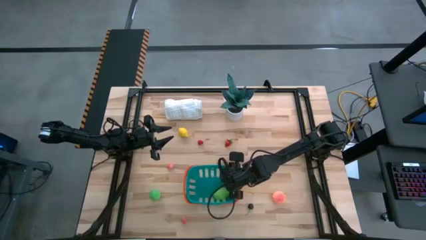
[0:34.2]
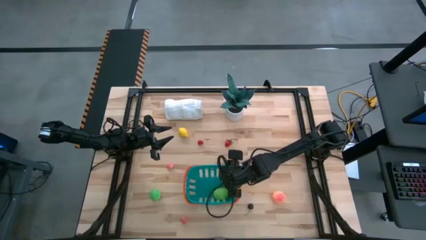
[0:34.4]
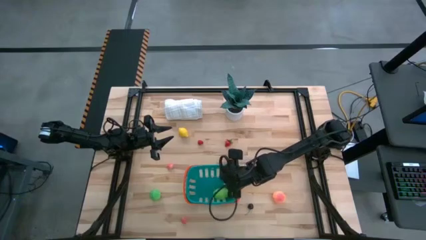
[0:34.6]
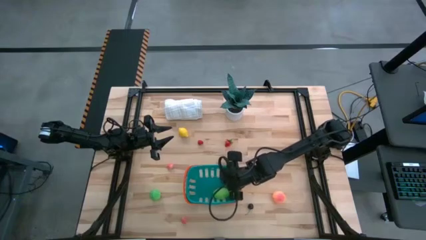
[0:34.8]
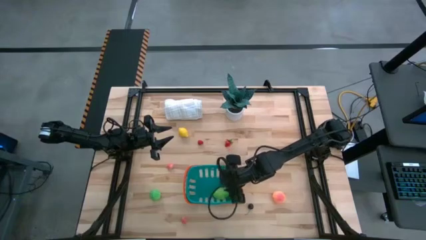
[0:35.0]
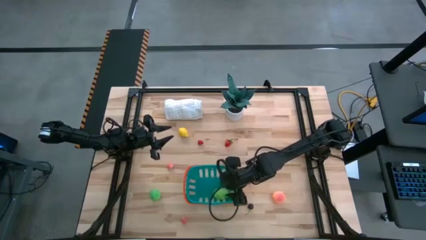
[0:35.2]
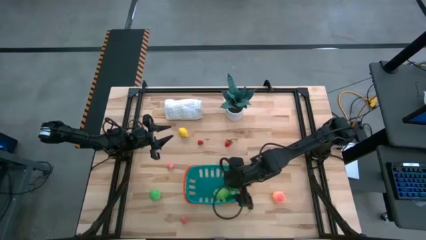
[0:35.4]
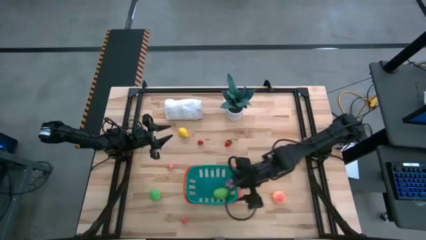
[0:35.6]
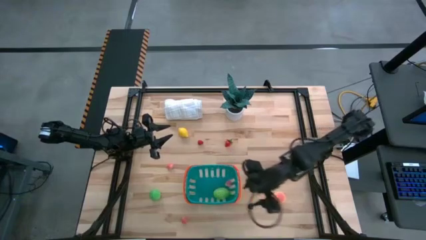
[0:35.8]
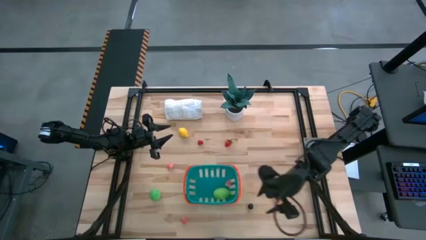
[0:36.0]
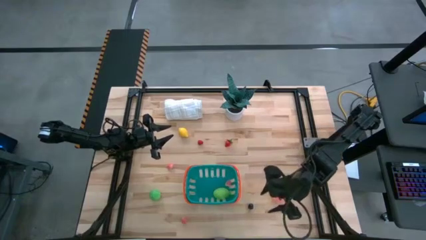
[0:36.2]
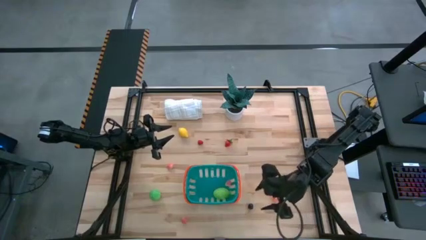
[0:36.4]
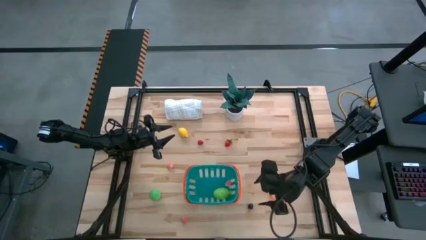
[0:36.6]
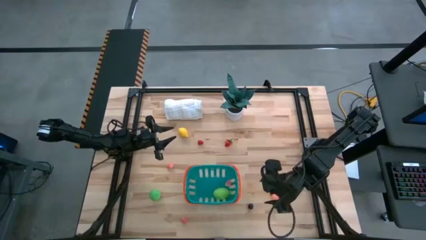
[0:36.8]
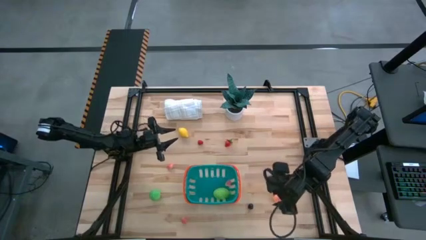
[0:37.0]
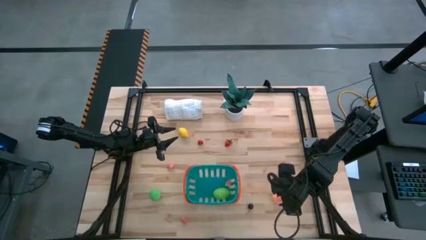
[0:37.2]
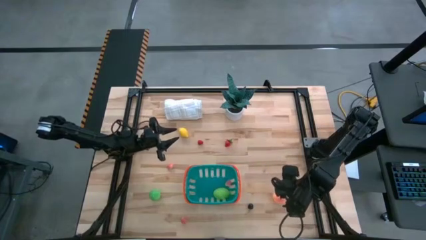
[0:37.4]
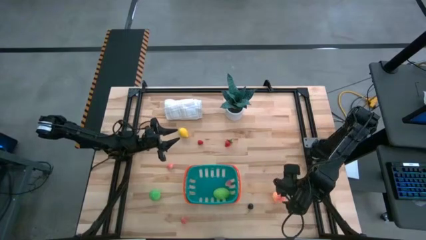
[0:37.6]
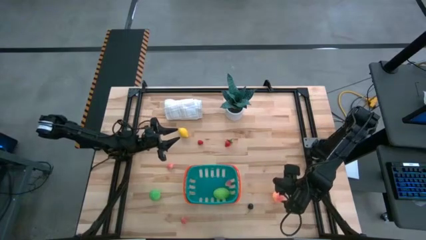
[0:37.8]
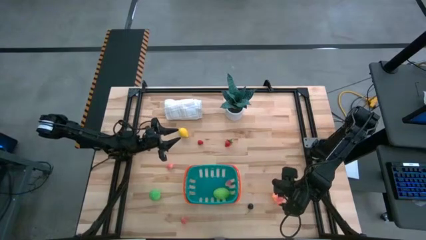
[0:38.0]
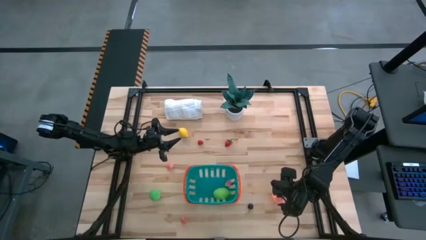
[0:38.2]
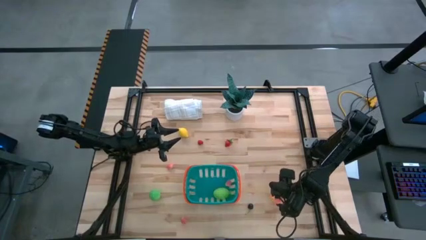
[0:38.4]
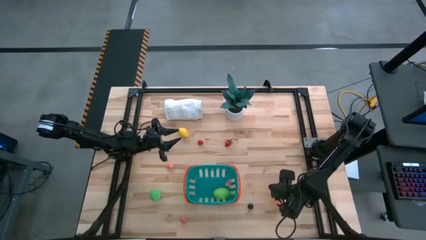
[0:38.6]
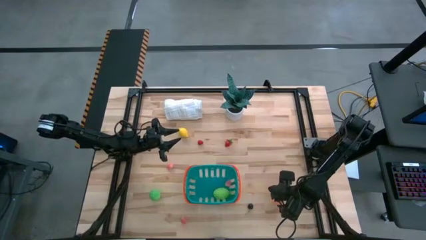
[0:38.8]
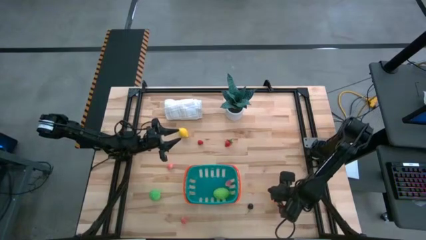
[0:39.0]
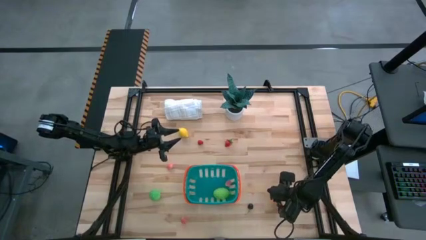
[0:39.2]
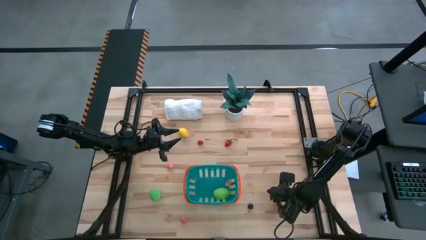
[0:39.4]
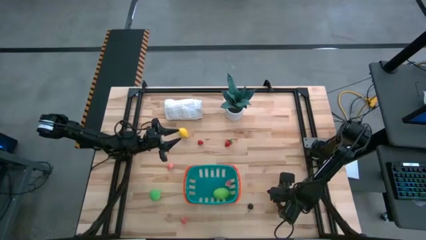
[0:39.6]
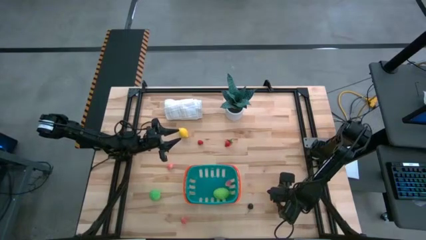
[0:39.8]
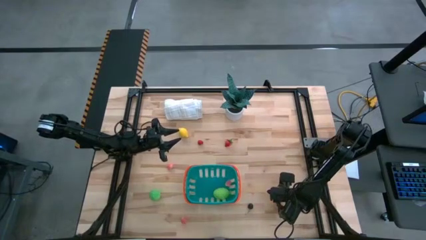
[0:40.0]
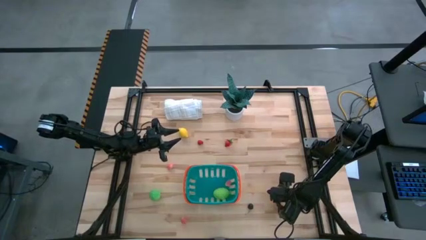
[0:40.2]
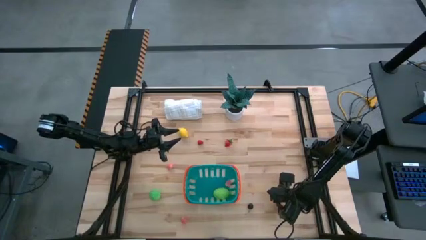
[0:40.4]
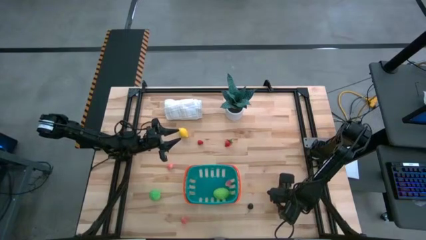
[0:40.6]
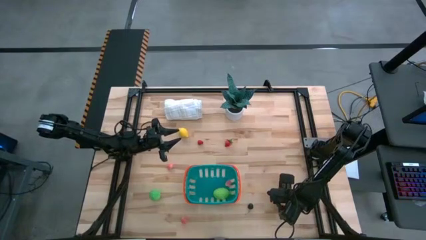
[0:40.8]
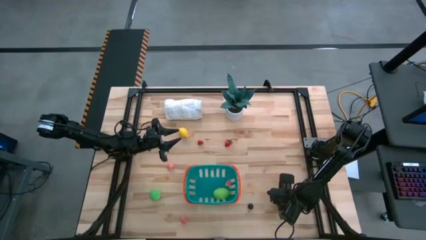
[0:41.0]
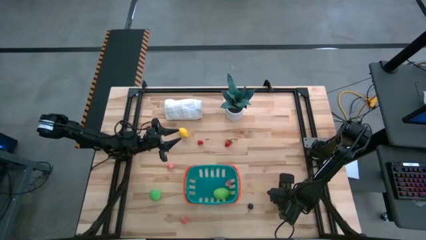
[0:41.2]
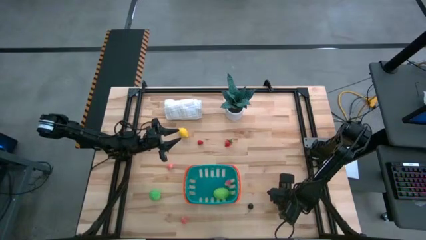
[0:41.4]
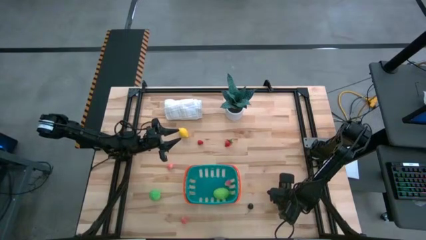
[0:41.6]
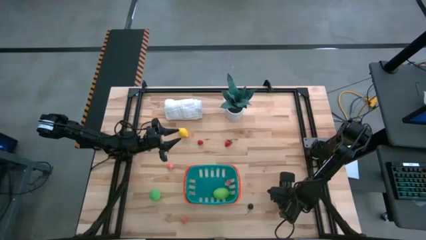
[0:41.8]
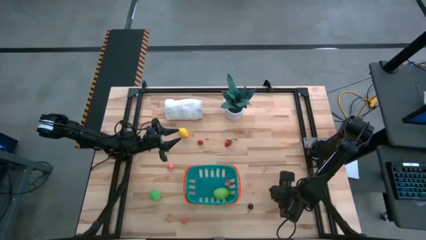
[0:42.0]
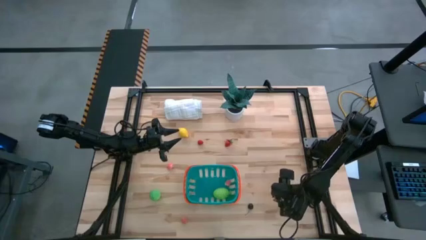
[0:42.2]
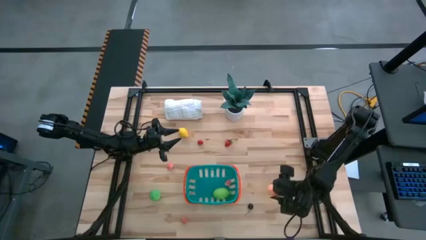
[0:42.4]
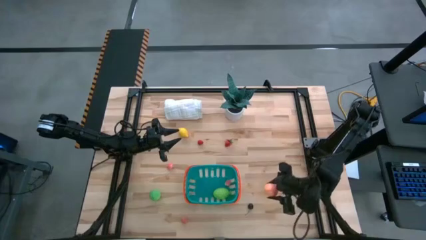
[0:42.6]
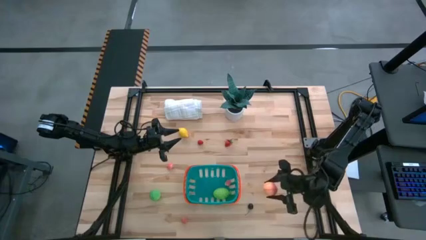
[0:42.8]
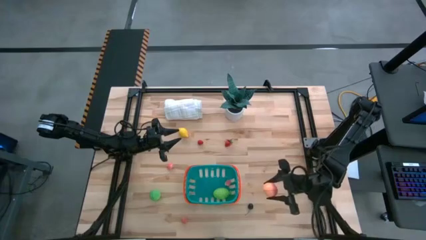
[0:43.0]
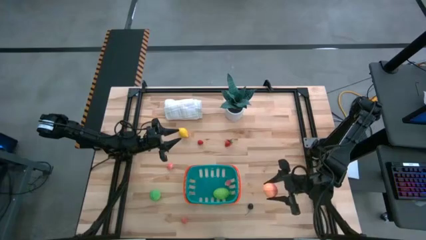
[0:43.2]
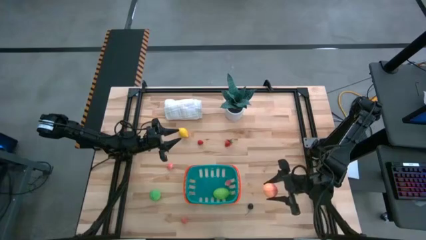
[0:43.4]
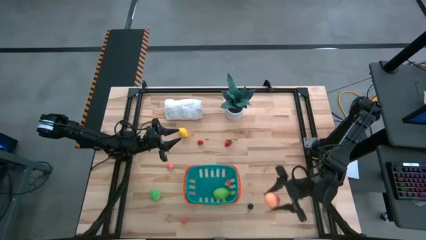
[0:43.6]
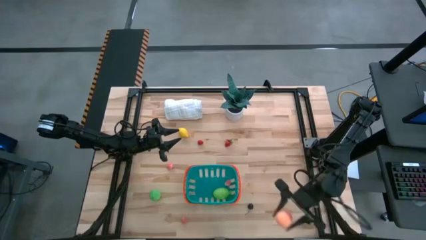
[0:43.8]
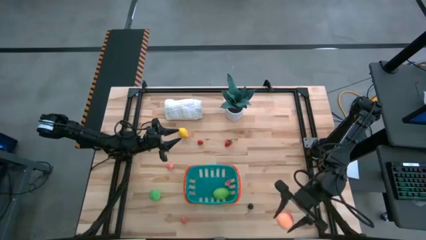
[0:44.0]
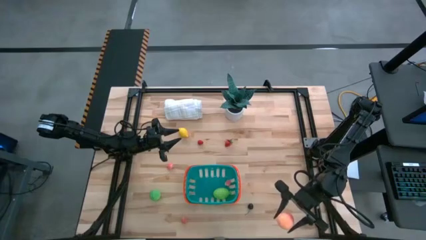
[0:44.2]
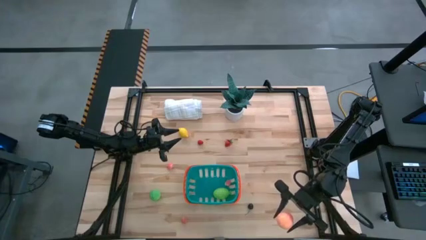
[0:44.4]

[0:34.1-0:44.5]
Task: Pick and placing Produce into tupperware
Put the large pink peach into the blue bin
